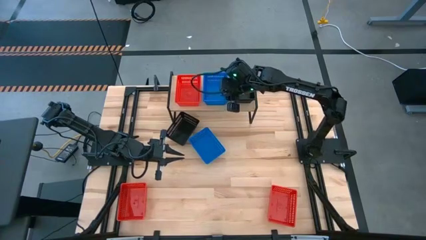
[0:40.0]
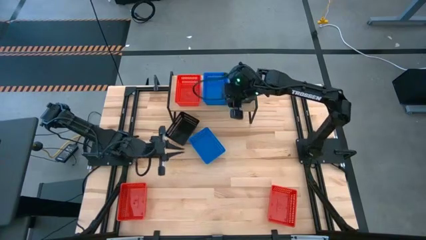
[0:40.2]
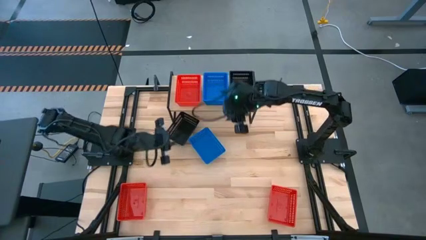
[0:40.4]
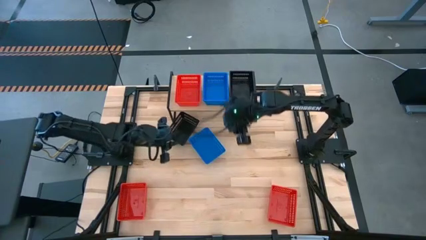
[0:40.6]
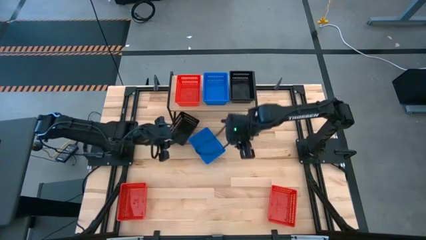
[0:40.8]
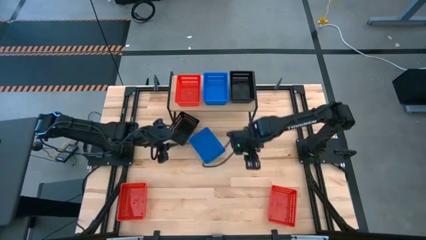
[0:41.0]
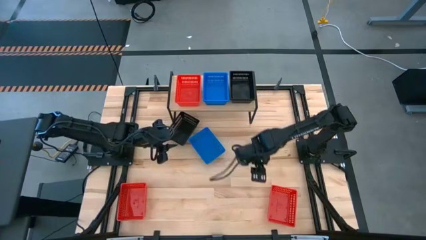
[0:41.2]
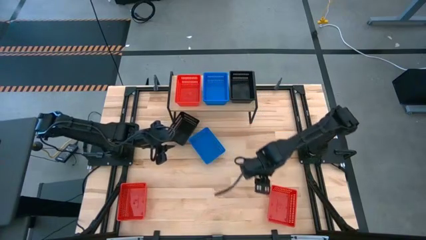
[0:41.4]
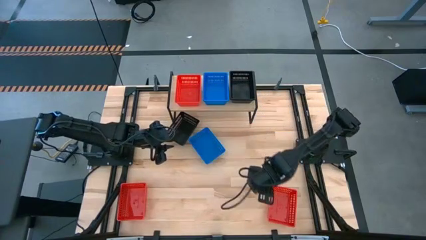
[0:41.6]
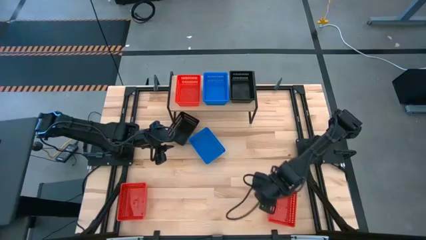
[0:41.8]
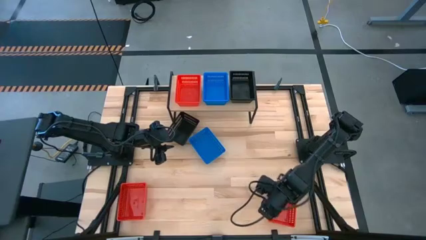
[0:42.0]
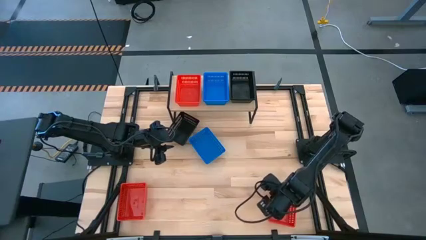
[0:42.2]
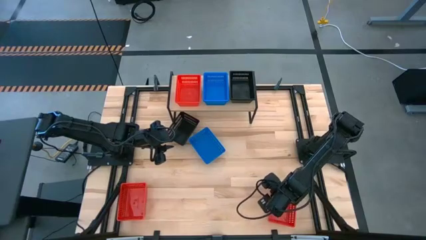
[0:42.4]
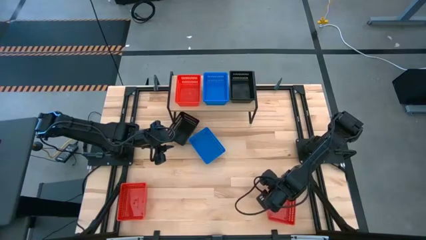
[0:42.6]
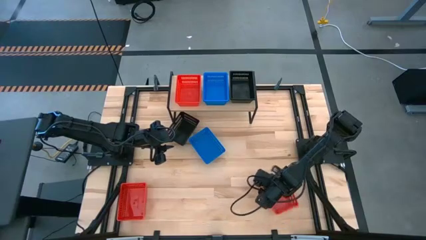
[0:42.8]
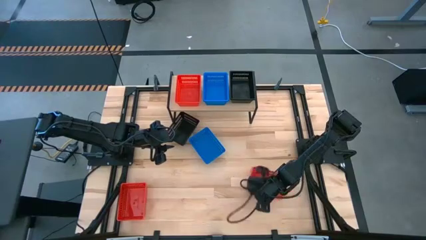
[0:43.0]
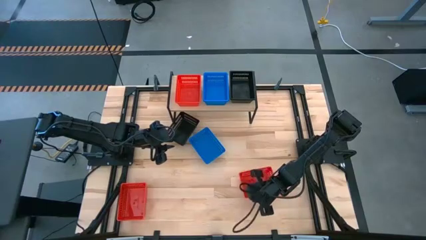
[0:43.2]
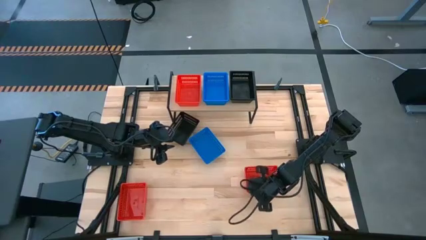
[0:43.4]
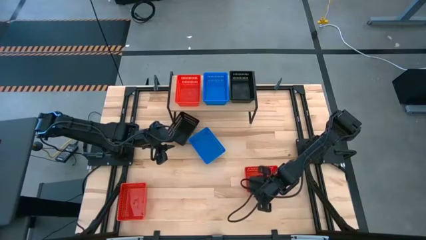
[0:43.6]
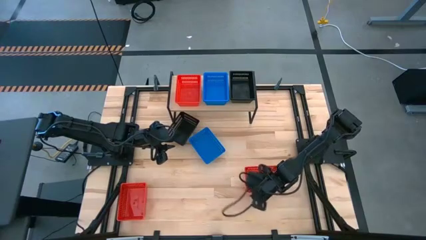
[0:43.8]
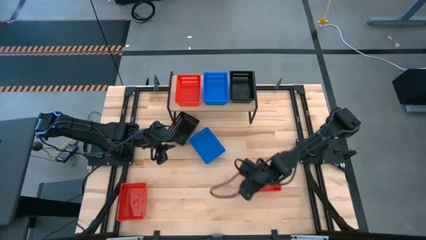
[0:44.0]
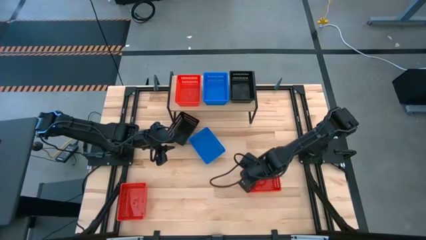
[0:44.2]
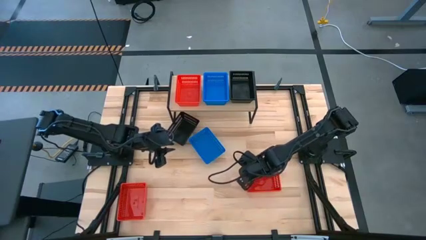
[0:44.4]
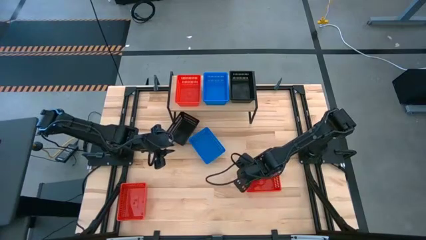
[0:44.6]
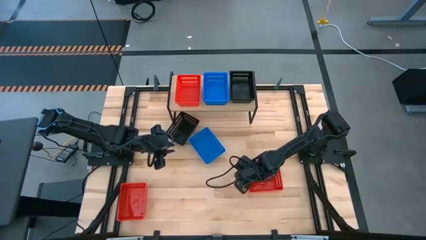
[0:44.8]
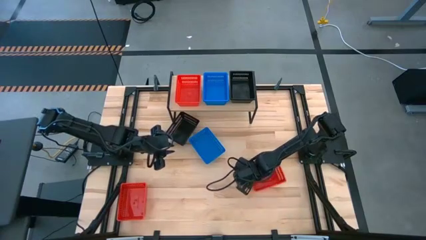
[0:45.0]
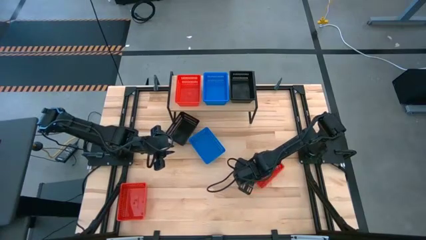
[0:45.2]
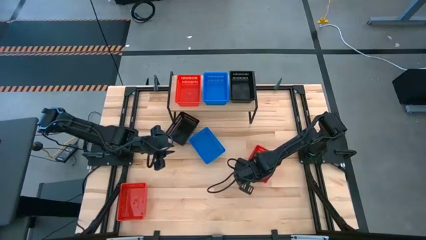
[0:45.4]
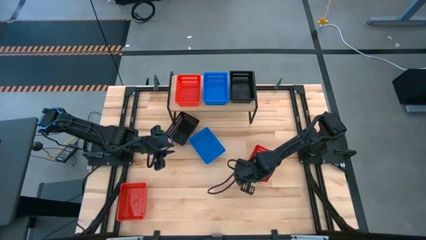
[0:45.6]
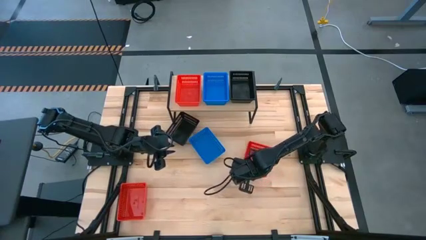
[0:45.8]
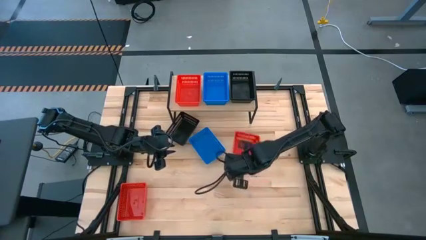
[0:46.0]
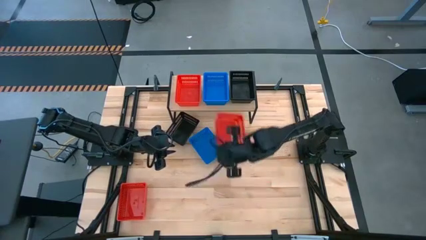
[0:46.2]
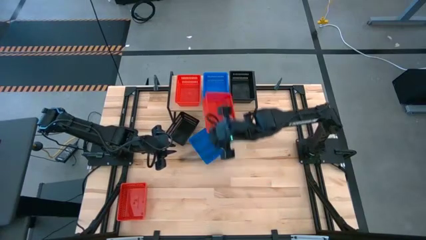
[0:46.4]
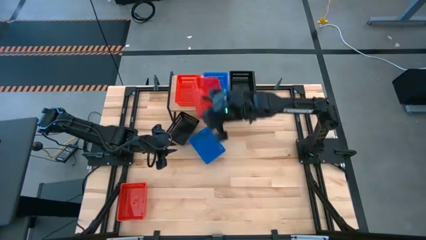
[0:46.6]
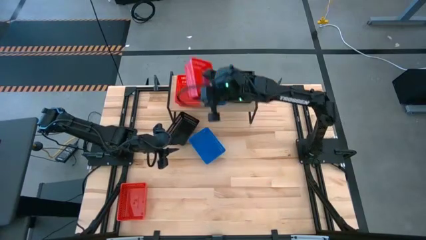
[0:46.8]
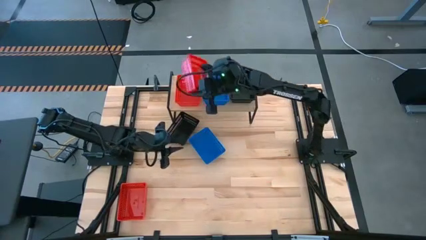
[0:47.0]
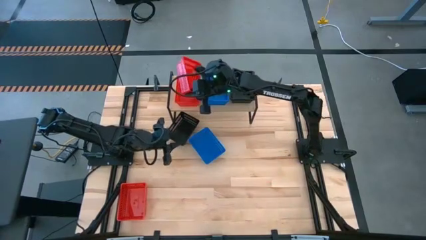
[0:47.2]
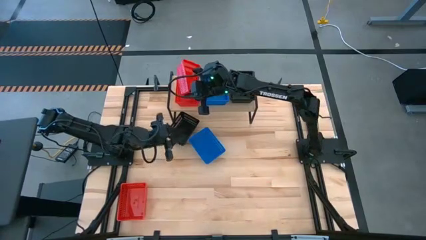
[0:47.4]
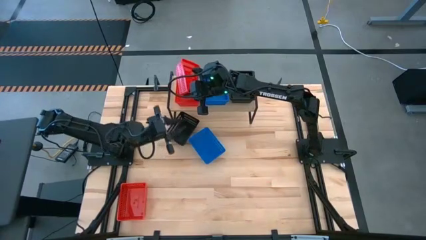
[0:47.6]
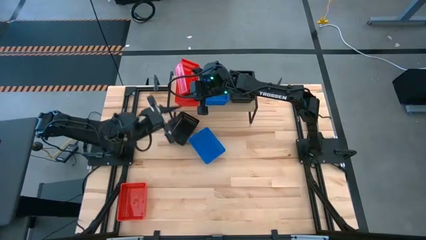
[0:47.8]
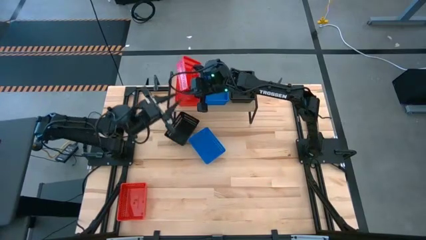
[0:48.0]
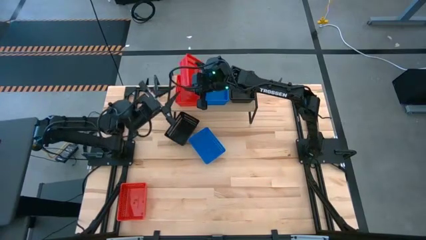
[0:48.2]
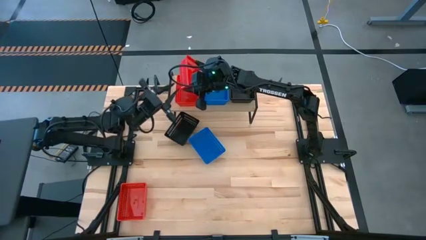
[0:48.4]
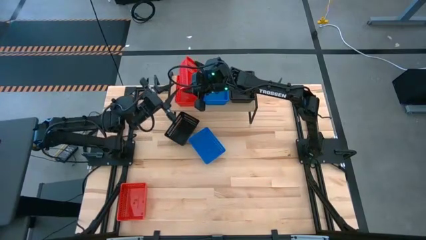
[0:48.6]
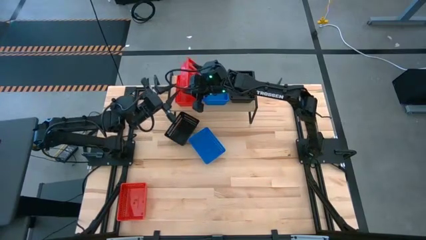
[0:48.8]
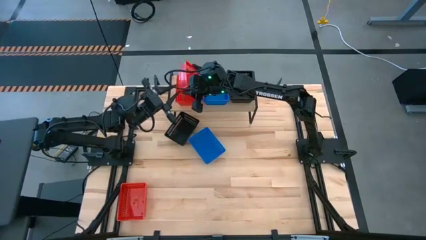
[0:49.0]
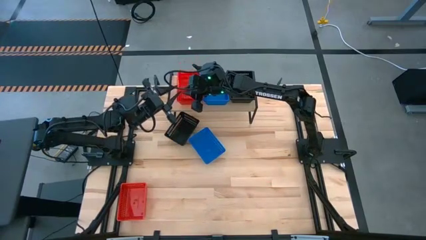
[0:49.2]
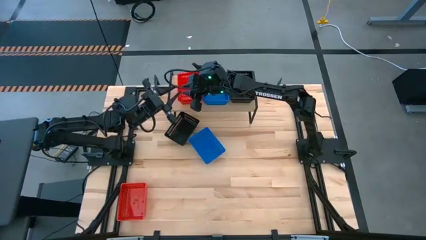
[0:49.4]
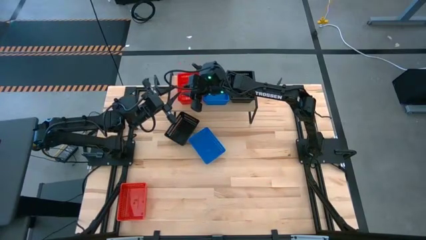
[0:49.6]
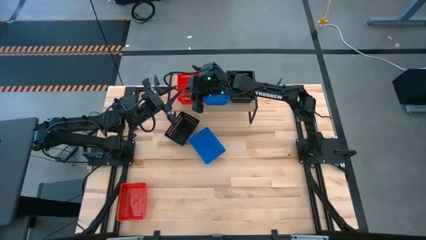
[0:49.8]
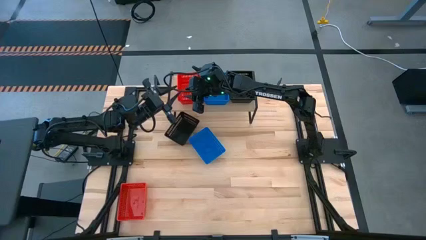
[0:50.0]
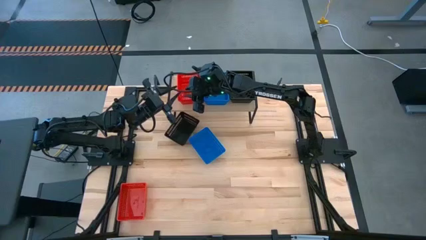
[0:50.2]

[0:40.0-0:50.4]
Task: Stack baskets on shelf by color
Stack the right red bin on top of the red bin on the shelf

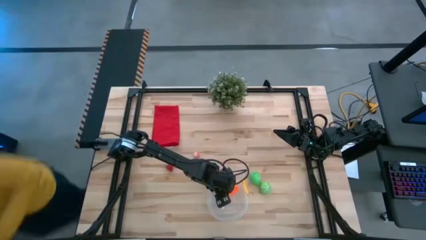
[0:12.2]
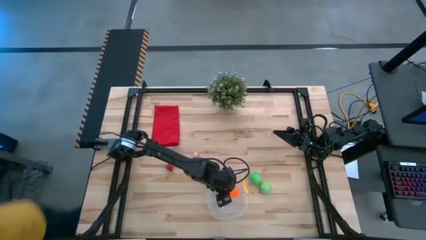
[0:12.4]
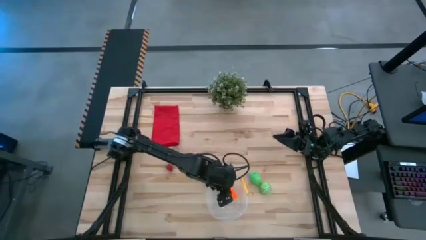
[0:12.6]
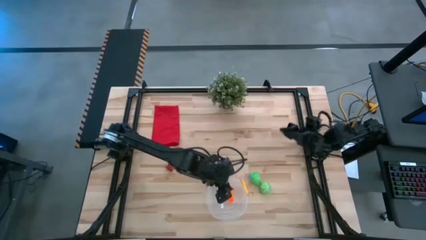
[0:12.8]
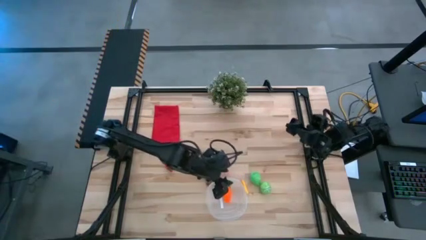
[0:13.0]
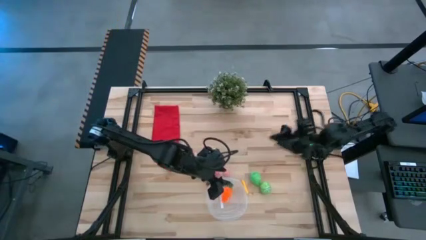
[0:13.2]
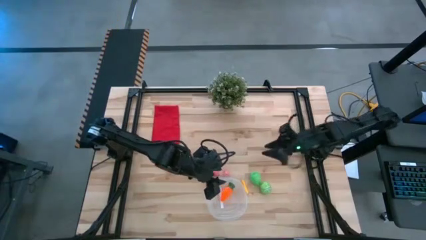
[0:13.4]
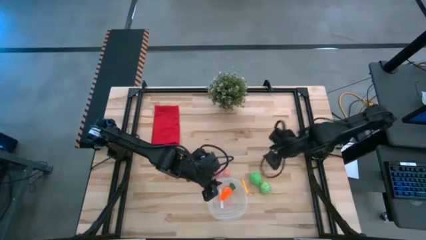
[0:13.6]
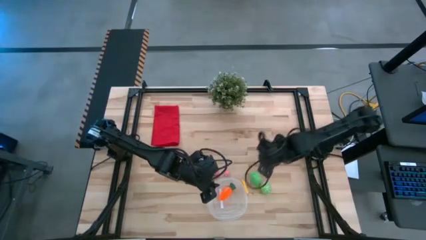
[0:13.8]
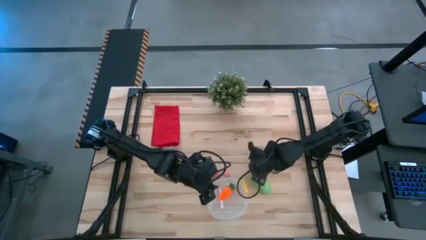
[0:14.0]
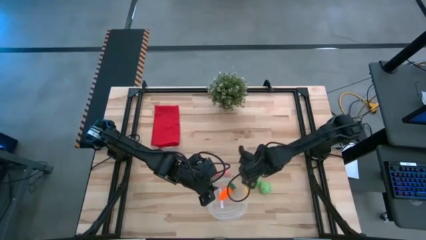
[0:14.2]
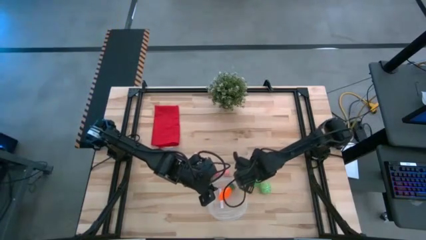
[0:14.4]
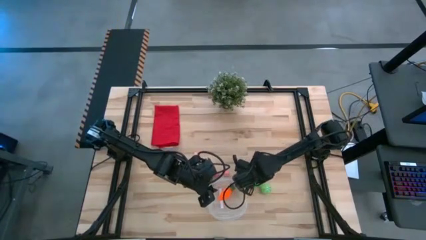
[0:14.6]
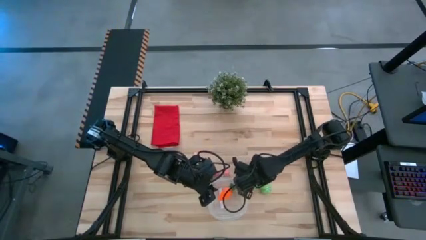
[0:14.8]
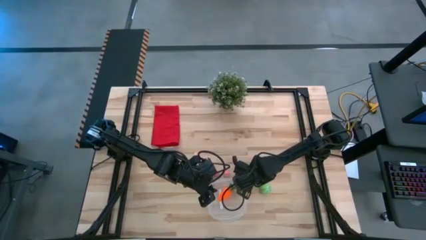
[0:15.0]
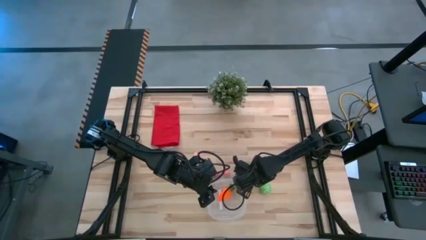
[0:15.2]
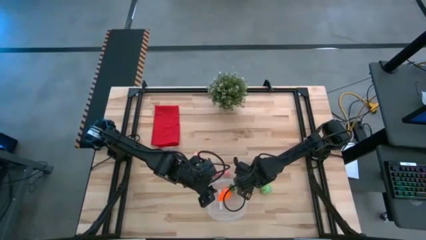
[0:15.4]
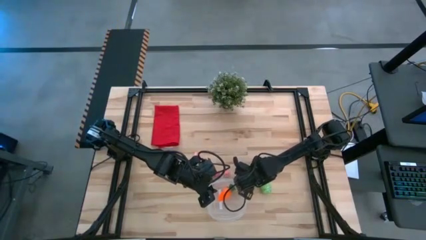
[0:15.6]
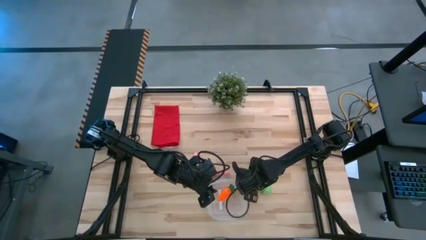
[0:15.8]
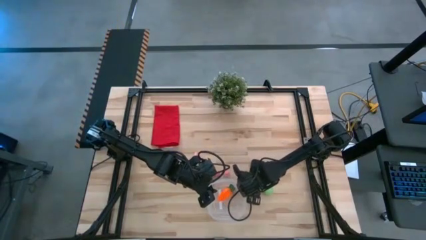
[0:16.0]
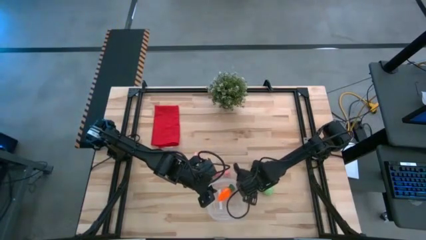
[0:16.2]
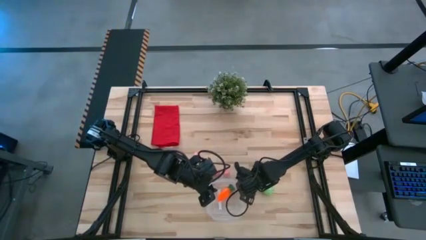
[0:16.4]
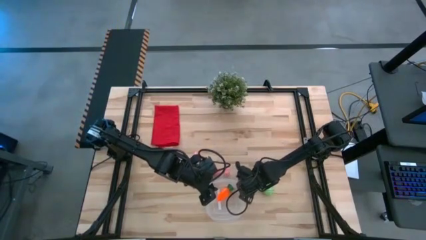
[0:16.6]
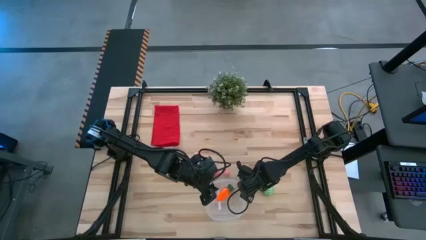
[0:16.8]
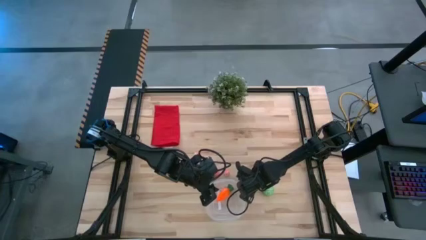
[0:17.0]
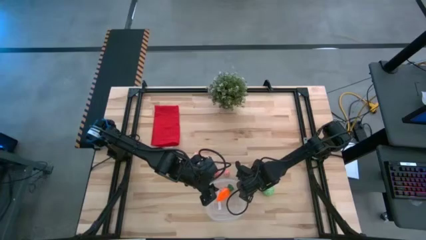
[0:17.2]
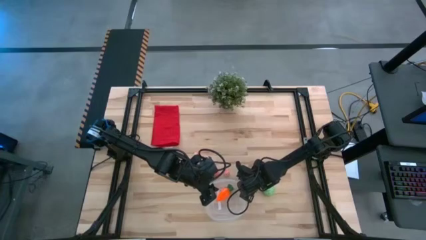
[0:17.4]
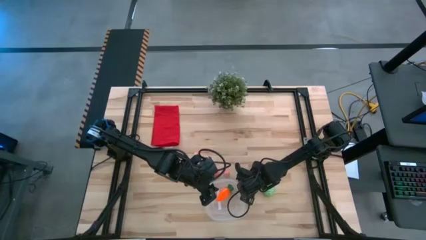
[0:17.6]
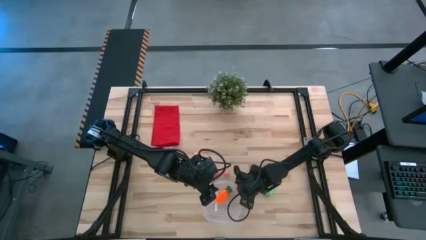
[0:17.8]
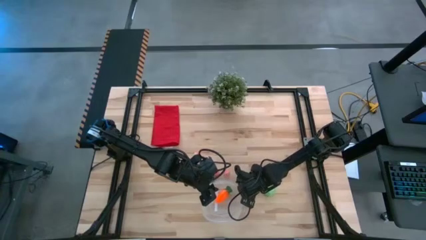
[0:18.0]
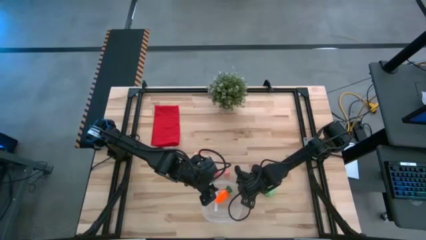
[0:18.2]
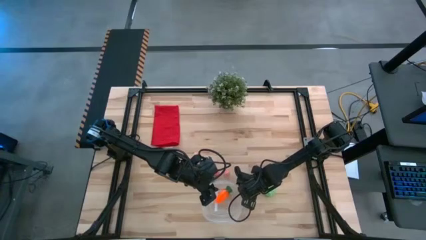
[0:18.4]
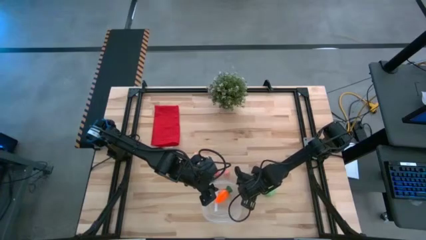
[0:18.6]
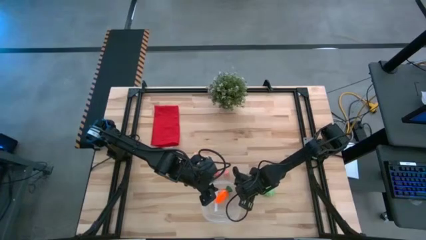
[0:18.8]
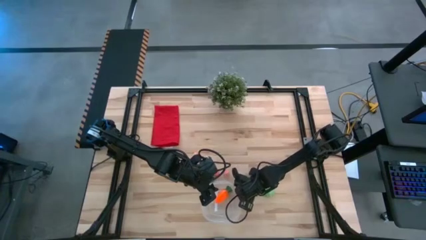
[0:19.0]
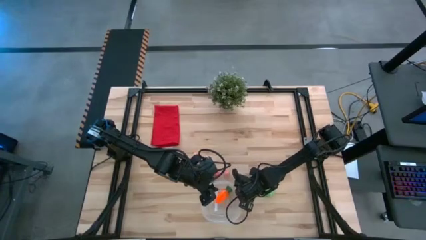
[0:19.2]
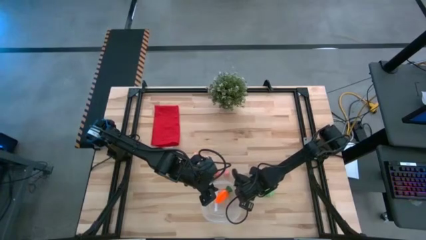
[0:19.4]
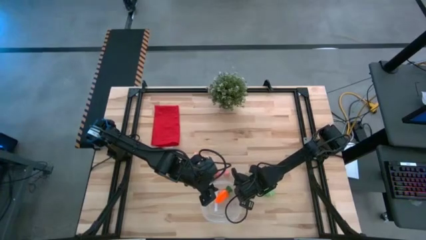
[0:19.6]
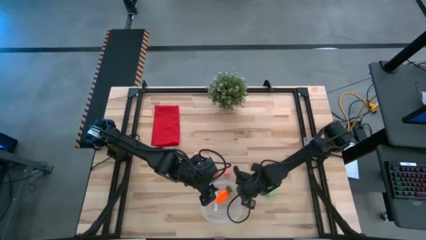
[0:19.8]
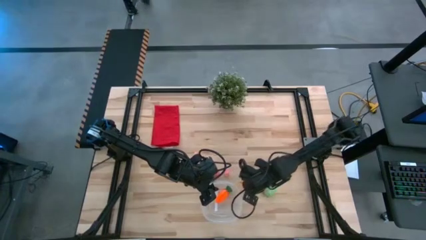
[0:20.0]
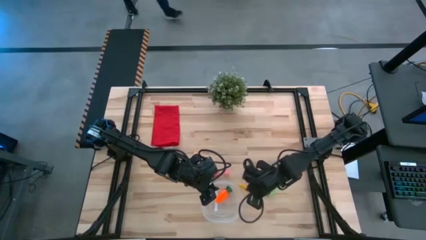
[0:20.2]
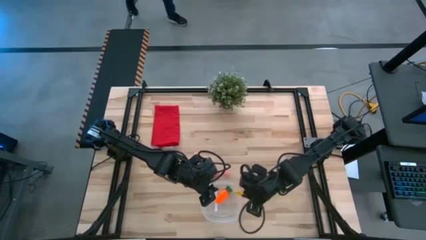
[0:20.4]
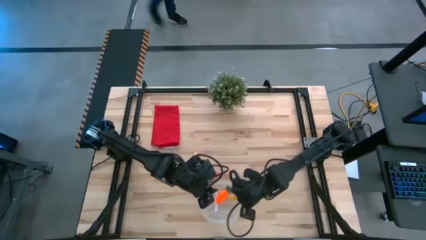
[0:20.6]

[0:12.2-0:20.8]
Task: Pick and placing Produce into tupperware
Put the yellow corn into the transparent bin
